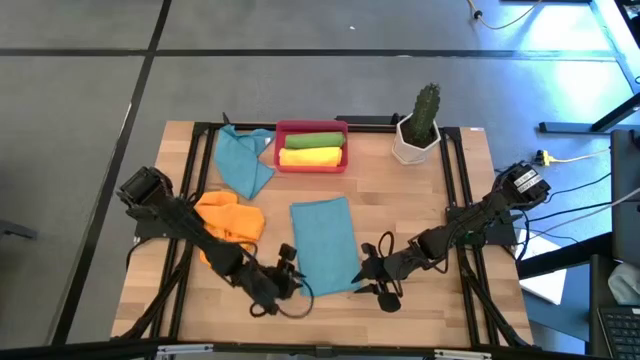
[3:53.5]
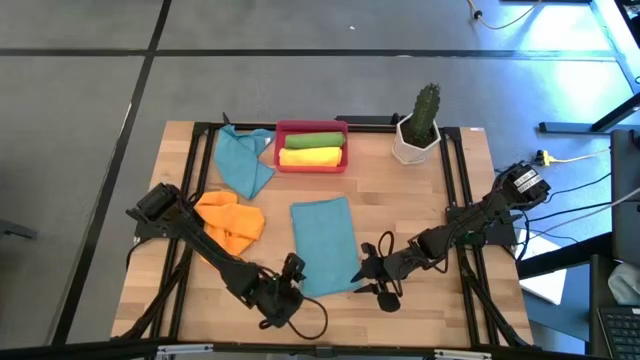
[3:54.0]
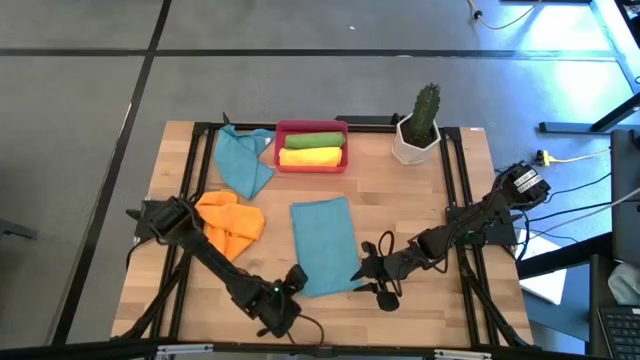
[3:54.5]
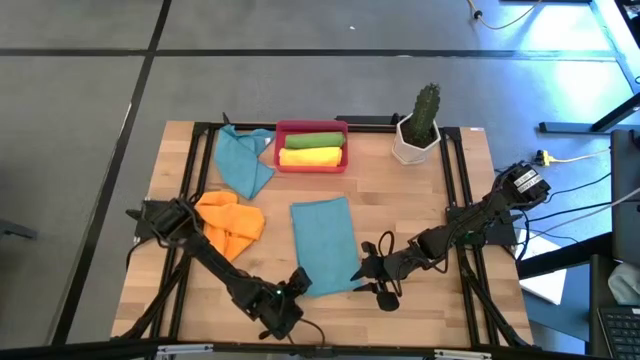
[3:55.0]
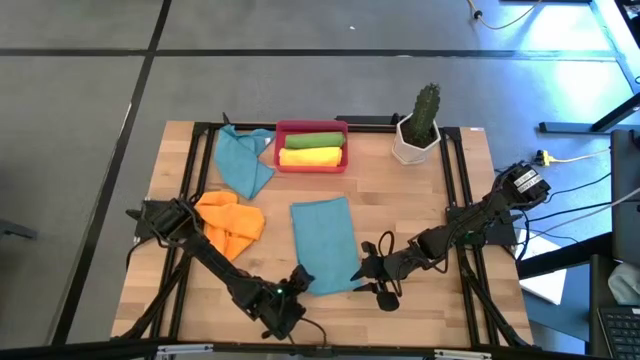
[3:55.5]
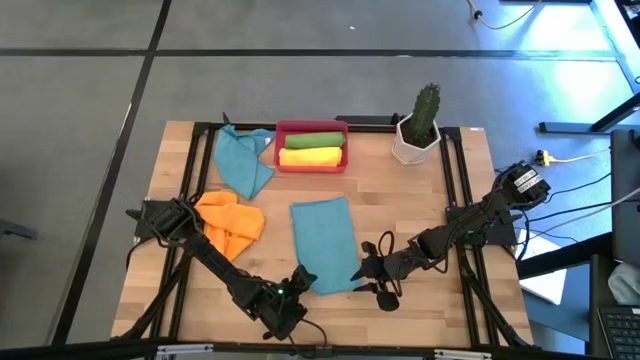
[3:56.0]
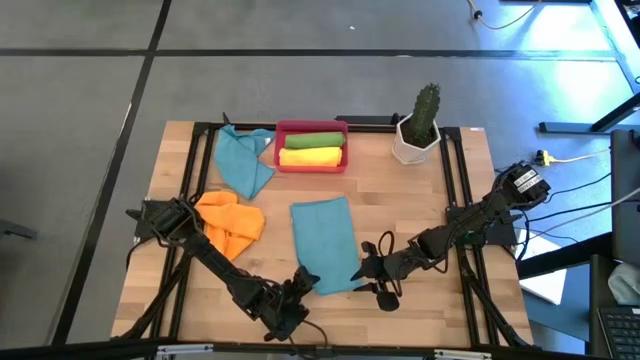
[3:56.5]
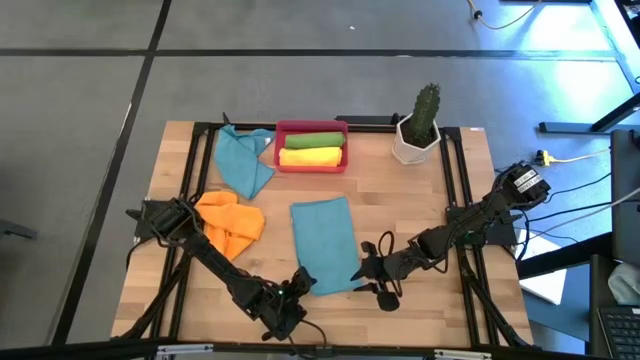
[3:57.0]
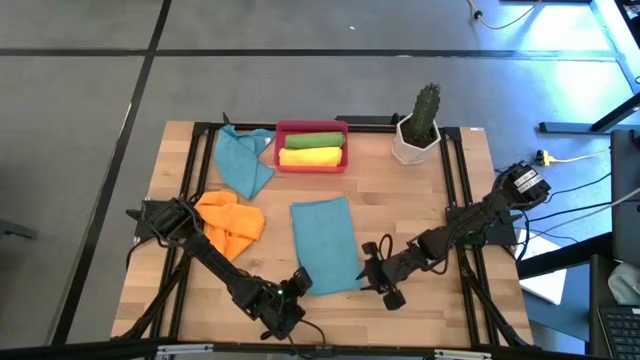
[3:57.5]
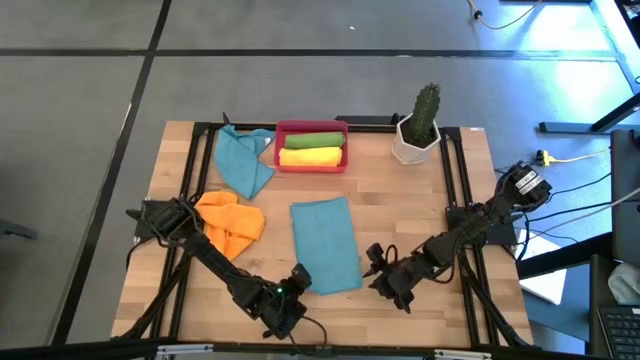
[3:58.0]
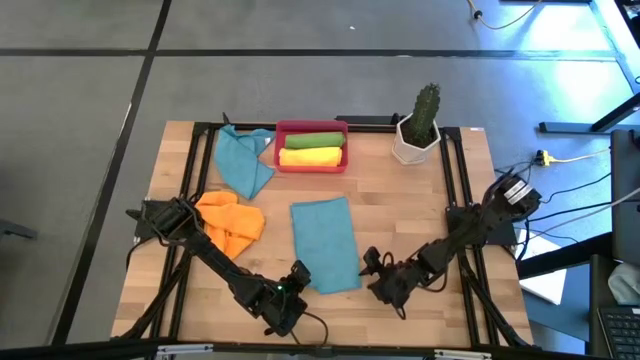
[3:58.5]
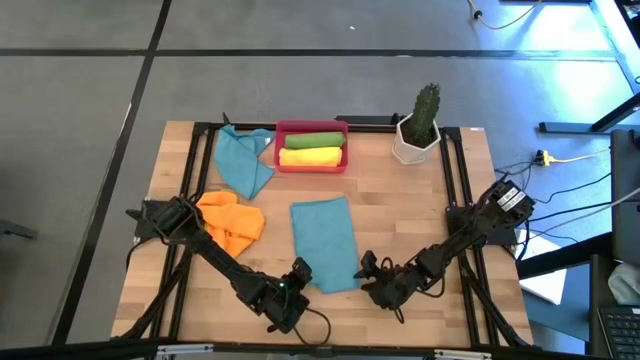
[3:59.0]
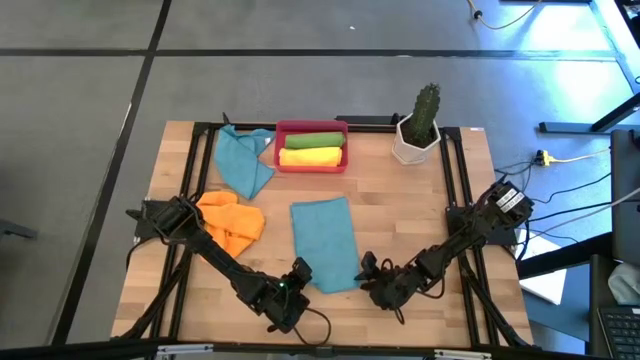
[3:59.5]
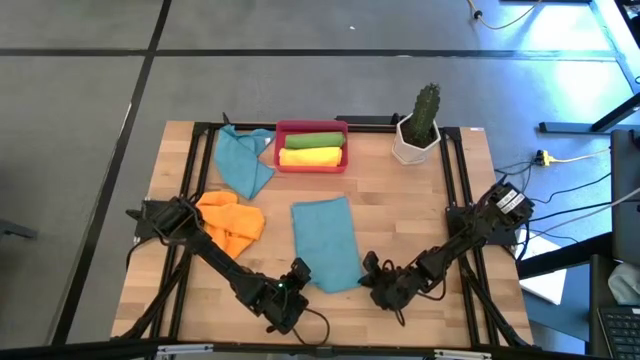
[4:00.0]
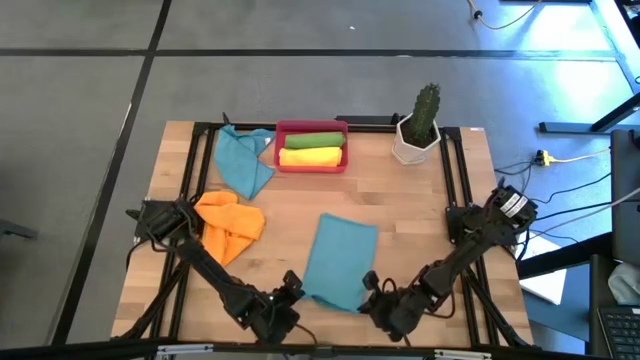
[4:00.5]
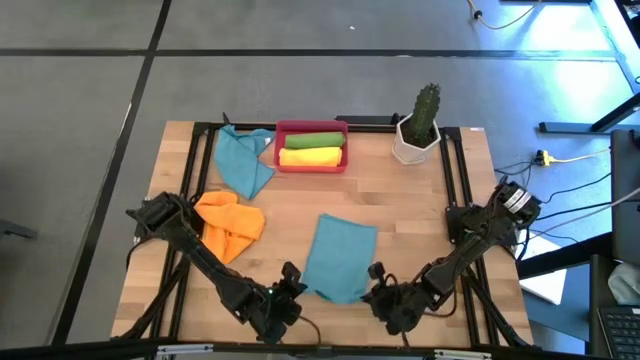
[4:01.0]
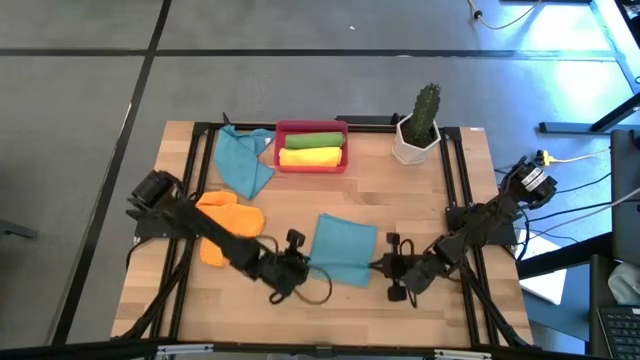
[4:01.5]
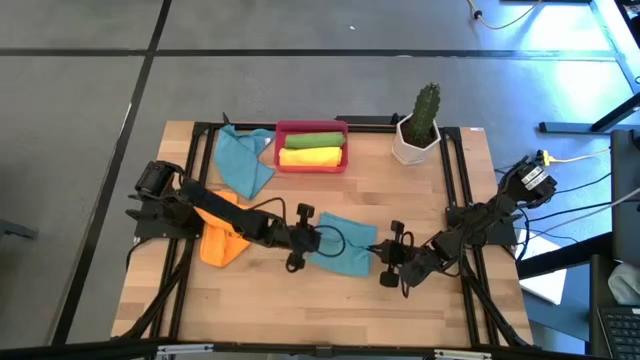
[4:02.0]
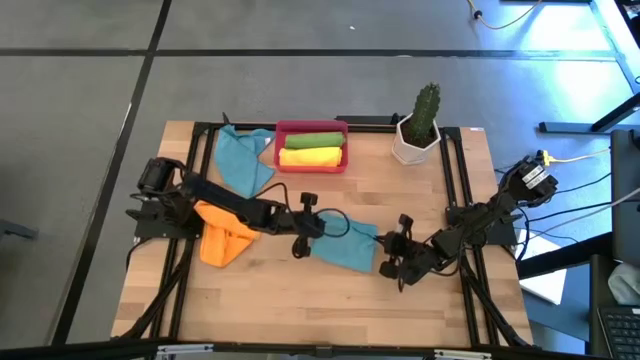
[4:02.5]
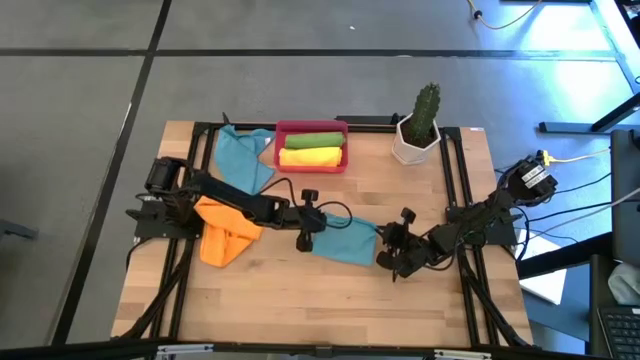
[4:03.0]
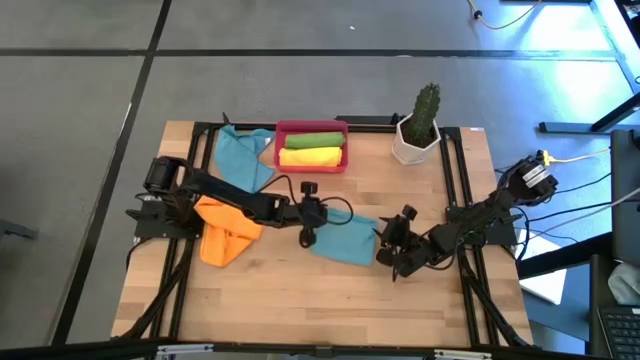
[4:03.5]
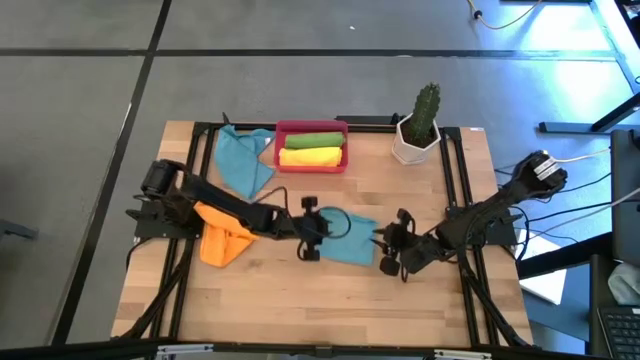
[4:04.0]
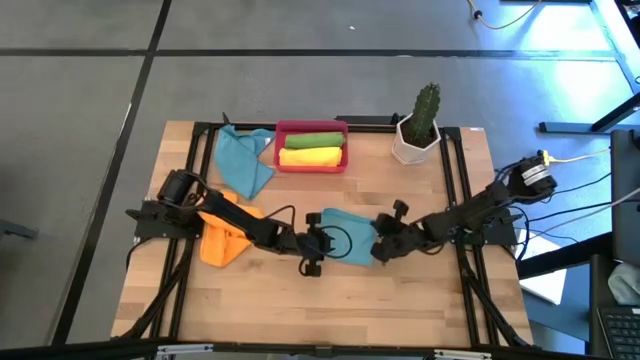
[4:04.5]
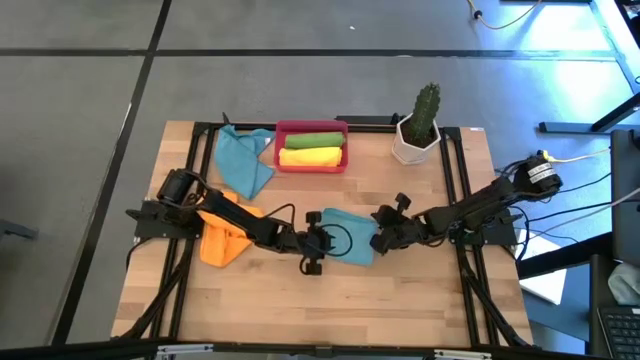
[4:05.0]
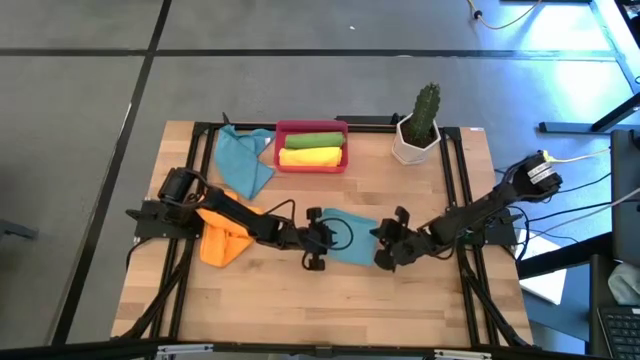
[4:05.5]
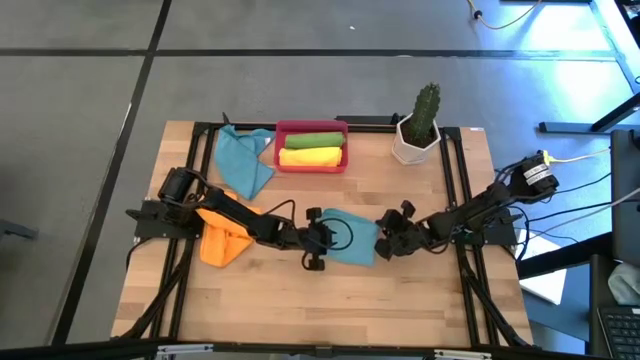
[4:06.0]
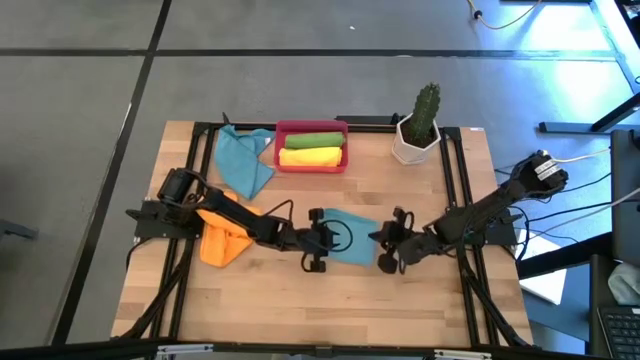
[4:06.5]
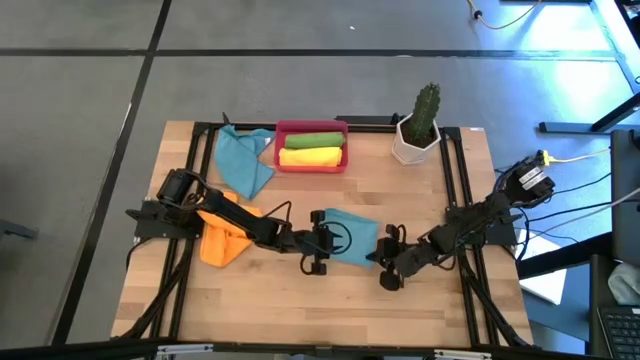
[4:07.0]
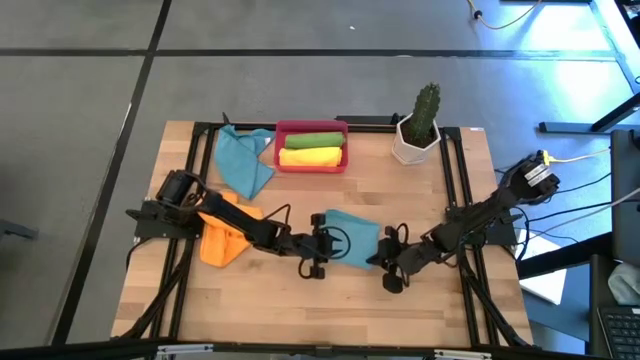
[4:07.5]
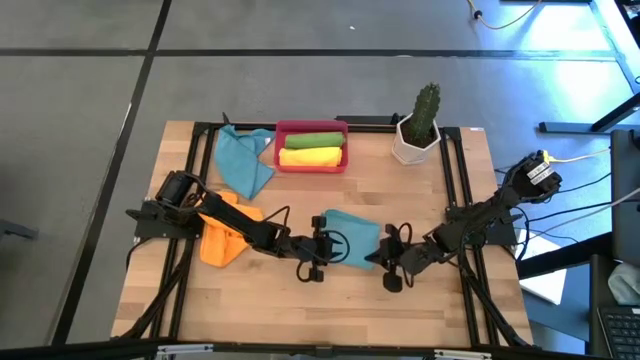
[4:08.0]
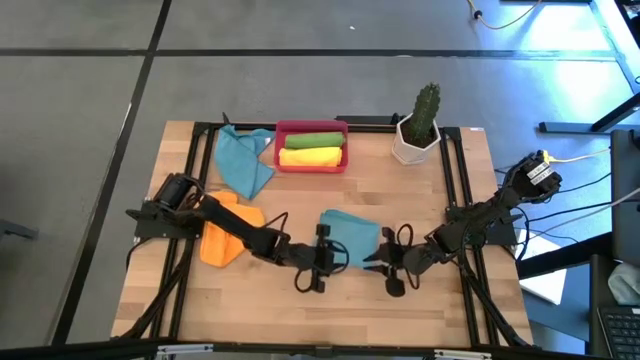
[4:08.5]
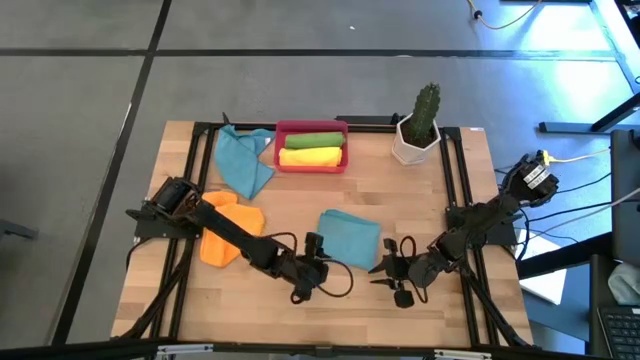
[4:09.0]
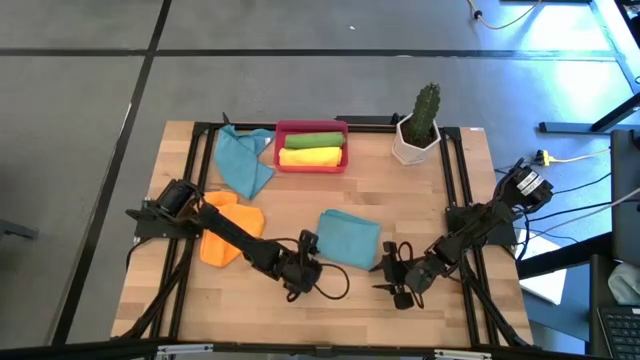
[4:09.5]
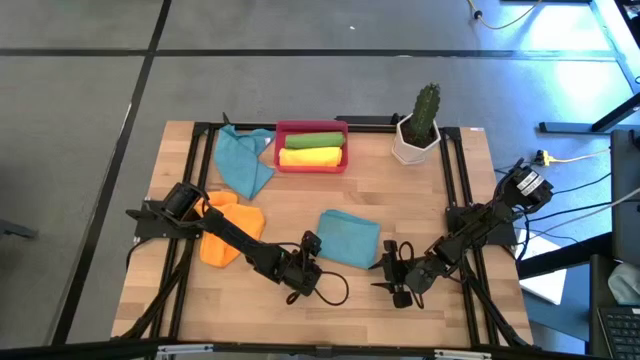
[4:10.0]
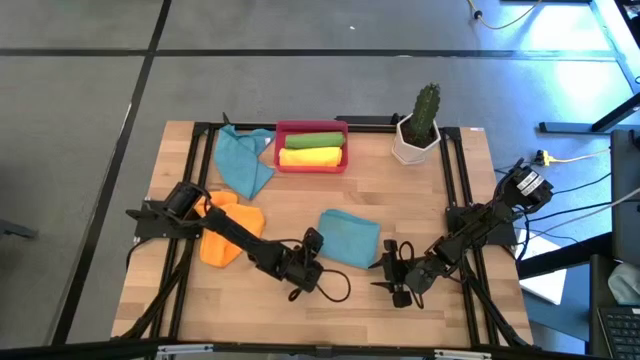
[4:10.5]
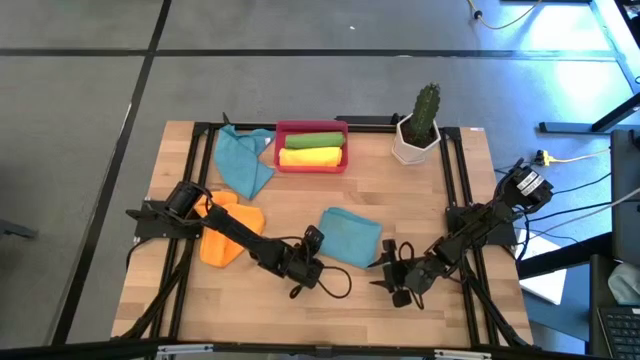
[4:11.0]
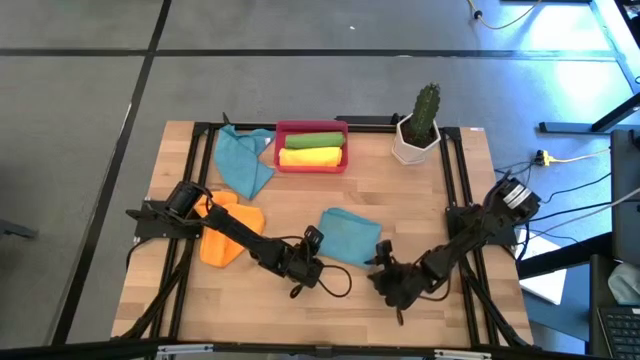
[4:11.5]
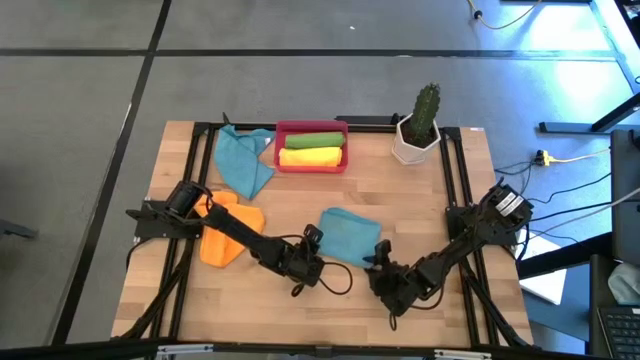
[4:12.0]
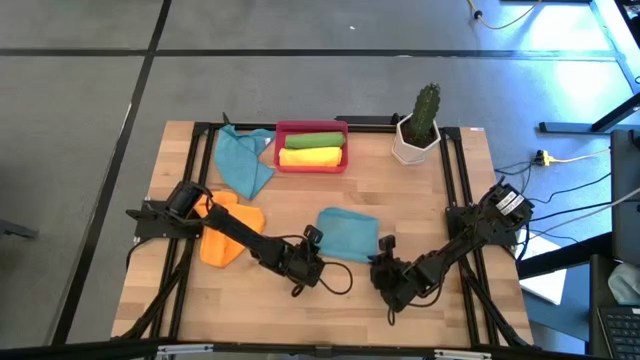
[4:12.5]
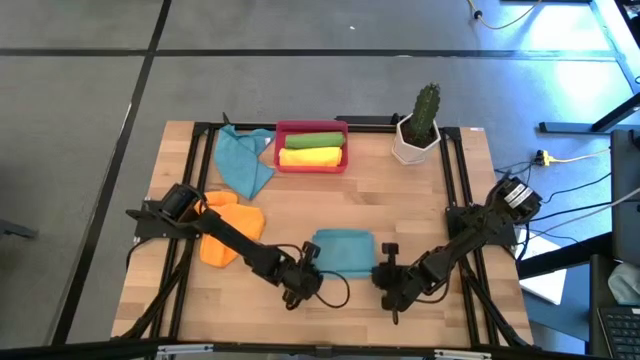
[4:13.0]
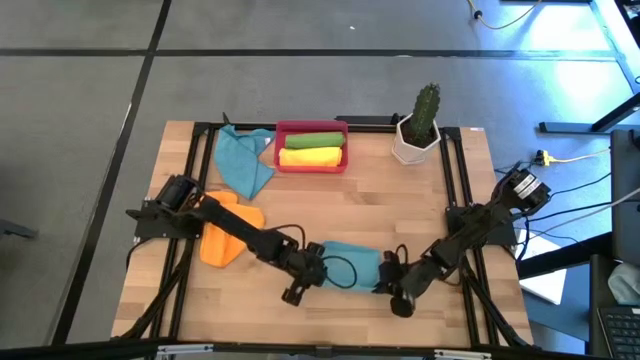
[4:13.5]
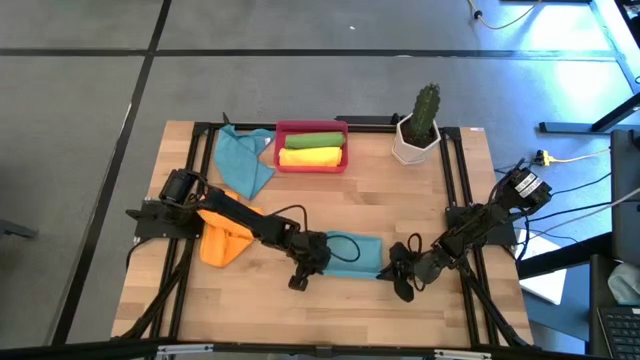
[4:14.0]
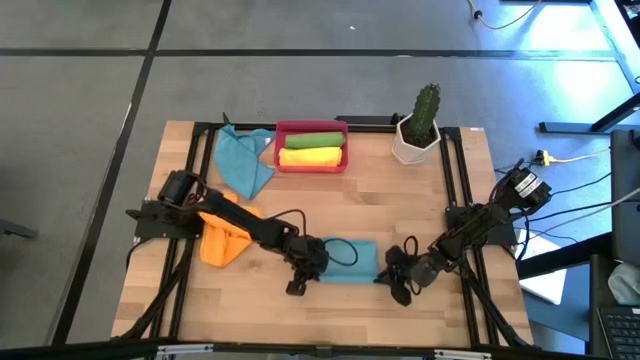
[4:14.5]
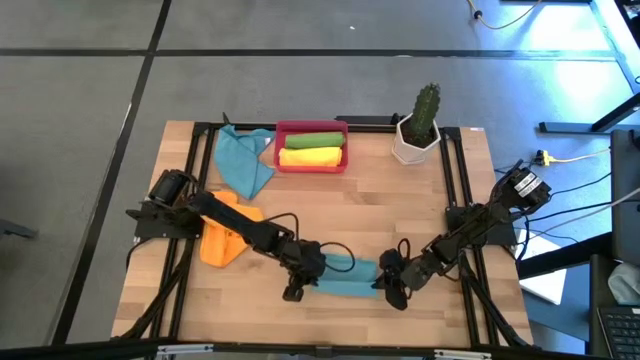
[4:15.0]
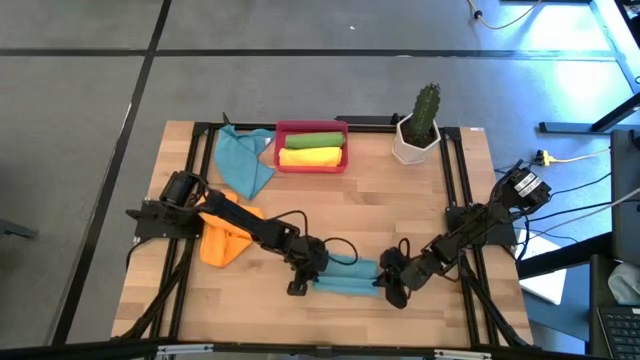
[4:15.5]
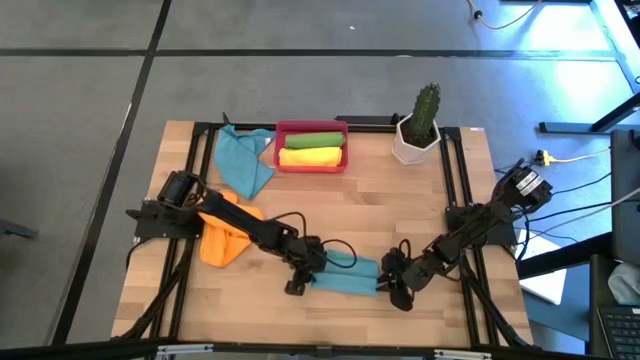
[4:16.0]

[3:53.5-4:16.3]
Task: Roll microfiber towels into tight, uniform cylinder then place into a basket
Roll the bottom blue towel
